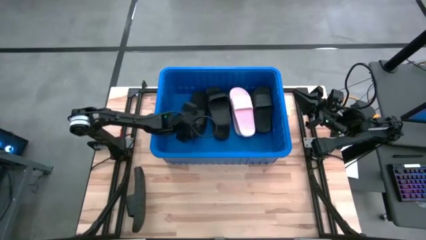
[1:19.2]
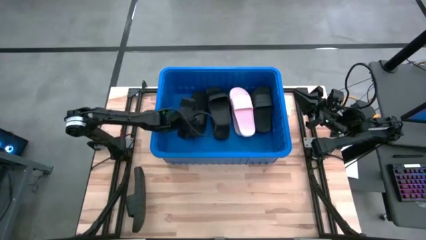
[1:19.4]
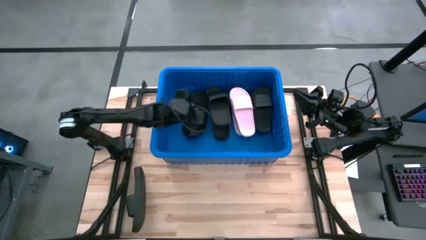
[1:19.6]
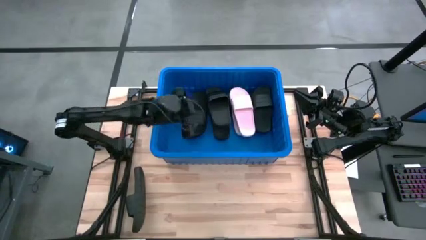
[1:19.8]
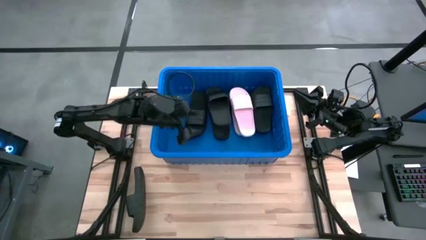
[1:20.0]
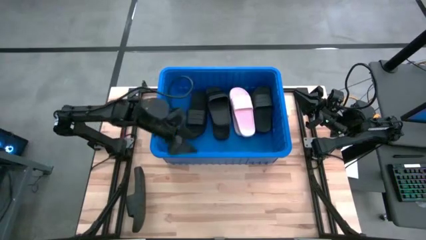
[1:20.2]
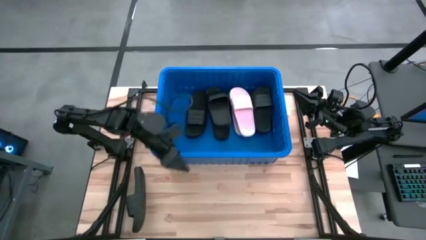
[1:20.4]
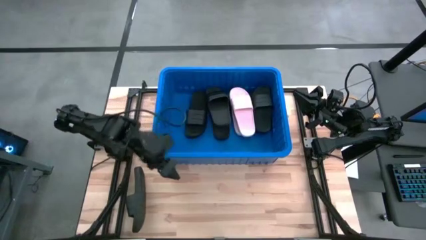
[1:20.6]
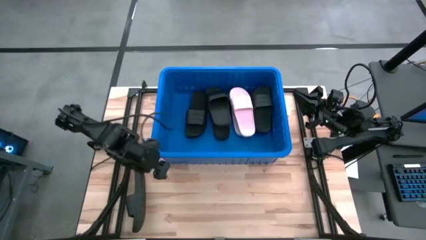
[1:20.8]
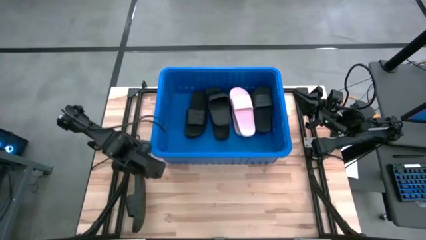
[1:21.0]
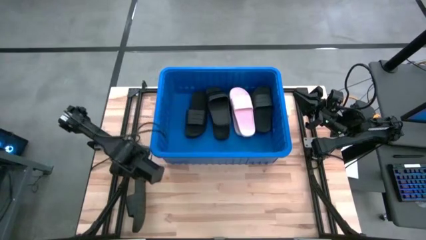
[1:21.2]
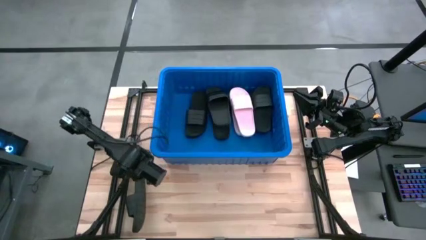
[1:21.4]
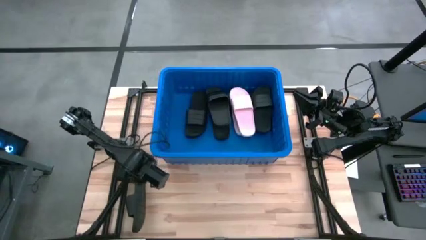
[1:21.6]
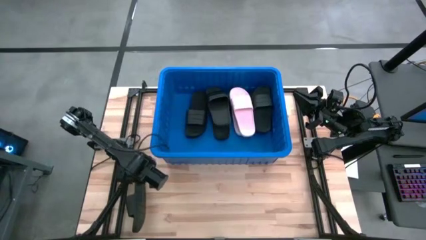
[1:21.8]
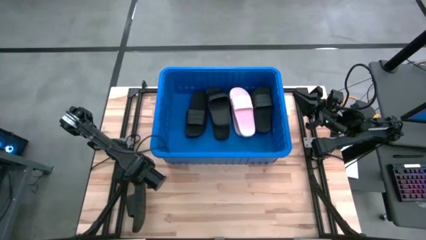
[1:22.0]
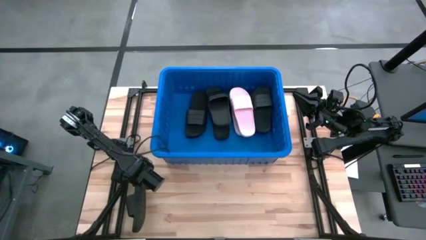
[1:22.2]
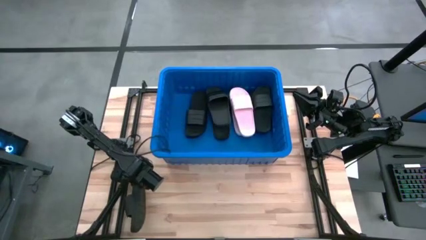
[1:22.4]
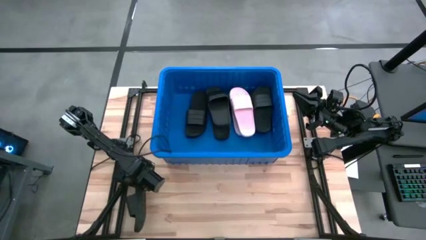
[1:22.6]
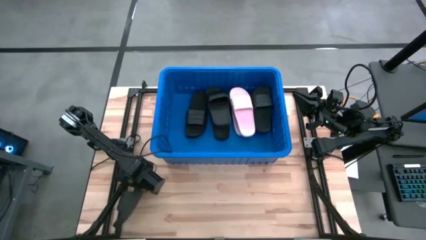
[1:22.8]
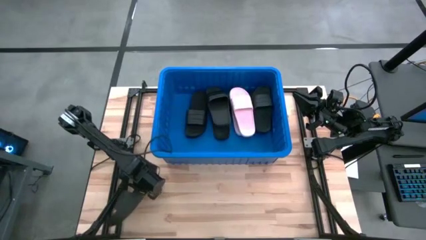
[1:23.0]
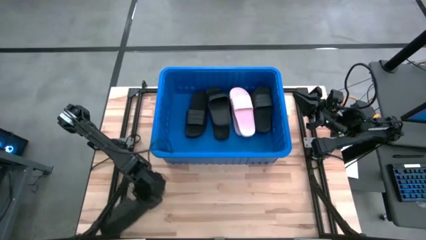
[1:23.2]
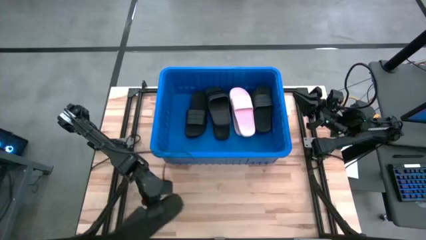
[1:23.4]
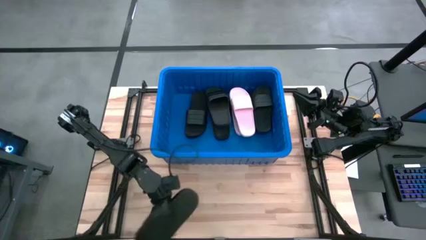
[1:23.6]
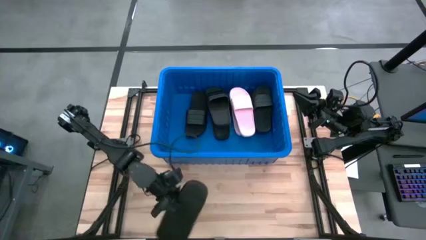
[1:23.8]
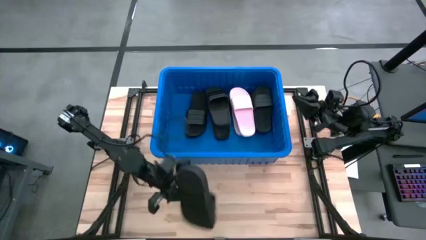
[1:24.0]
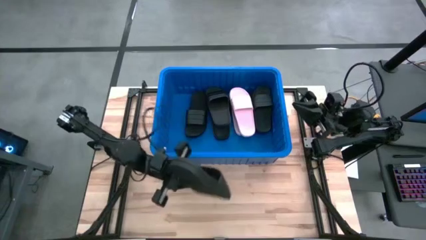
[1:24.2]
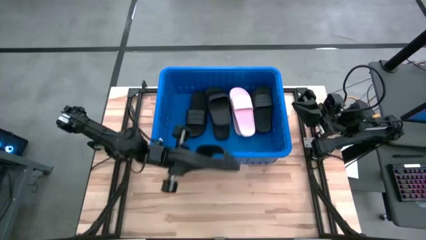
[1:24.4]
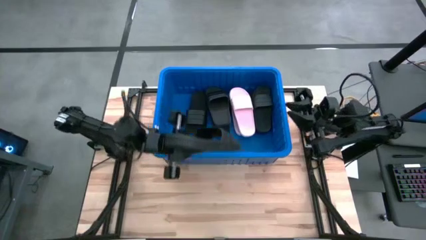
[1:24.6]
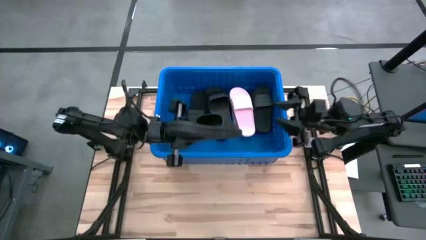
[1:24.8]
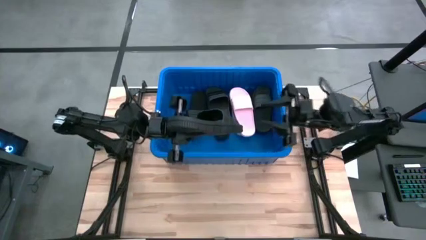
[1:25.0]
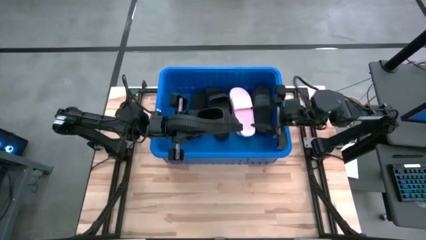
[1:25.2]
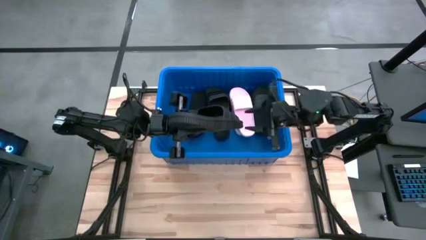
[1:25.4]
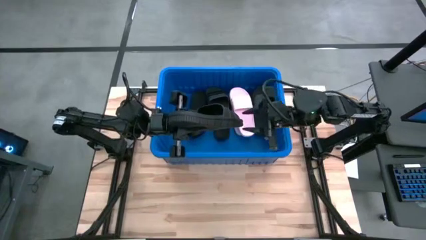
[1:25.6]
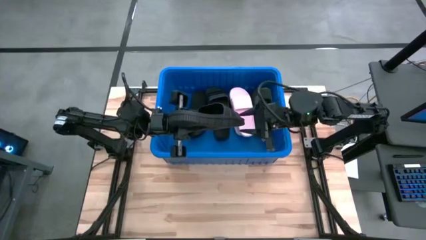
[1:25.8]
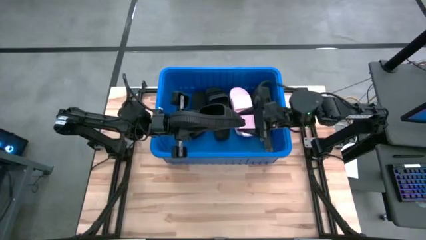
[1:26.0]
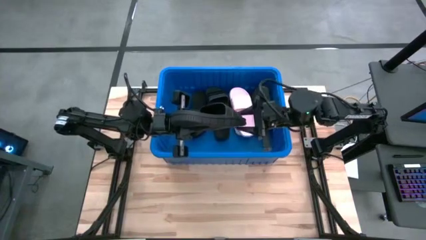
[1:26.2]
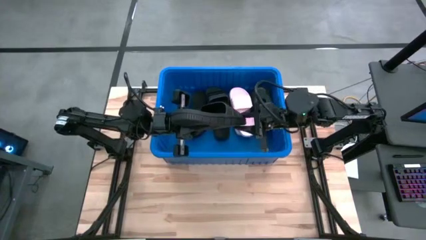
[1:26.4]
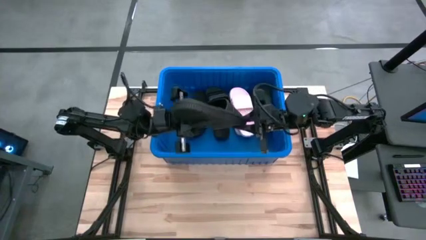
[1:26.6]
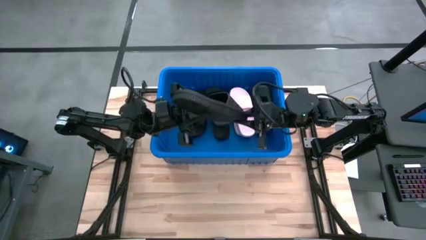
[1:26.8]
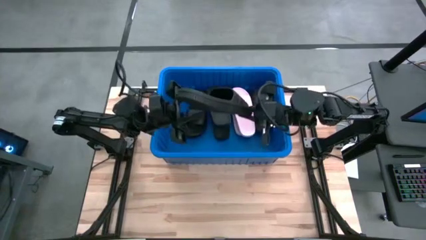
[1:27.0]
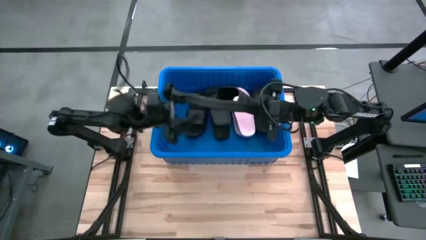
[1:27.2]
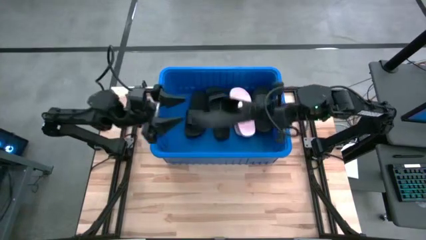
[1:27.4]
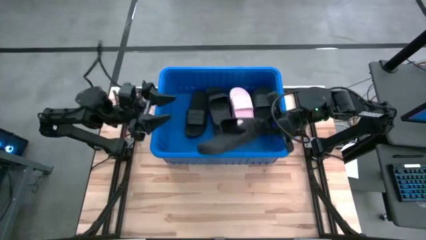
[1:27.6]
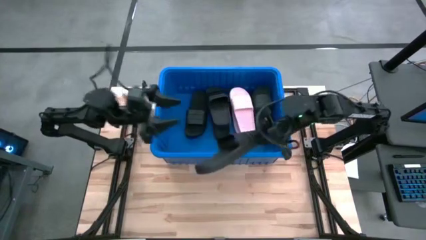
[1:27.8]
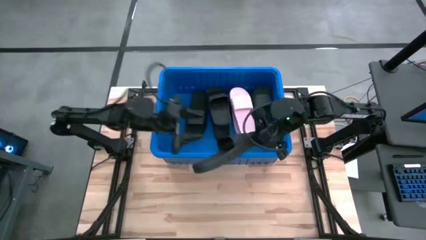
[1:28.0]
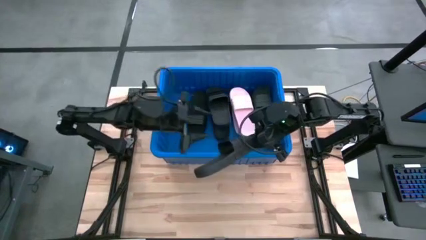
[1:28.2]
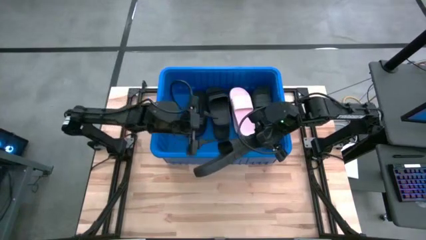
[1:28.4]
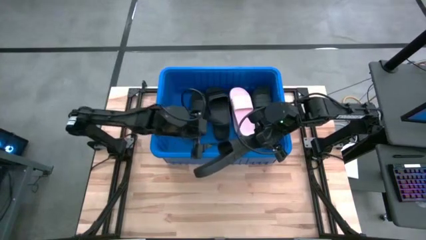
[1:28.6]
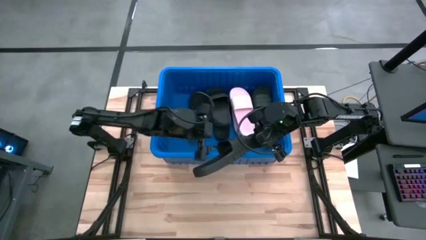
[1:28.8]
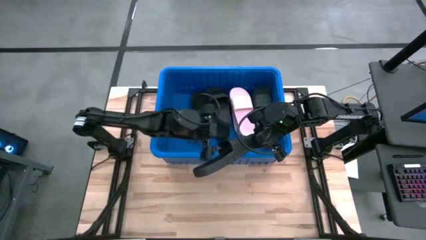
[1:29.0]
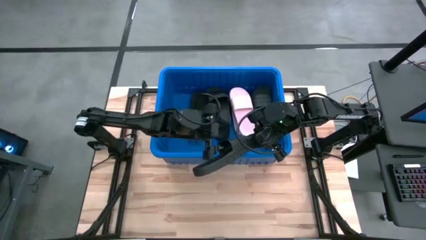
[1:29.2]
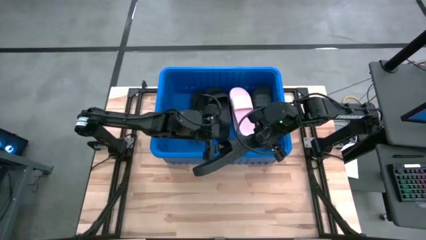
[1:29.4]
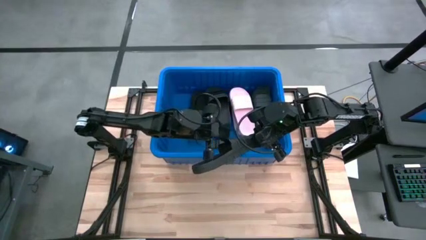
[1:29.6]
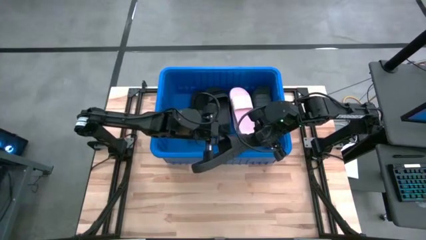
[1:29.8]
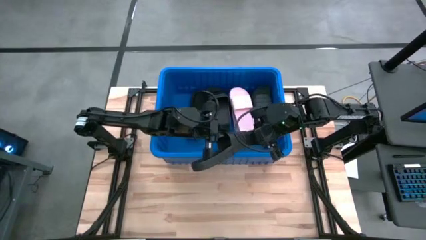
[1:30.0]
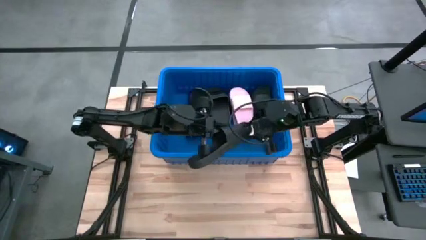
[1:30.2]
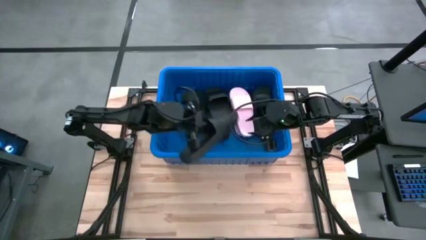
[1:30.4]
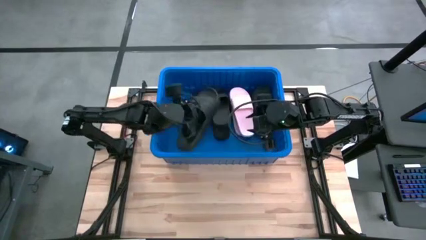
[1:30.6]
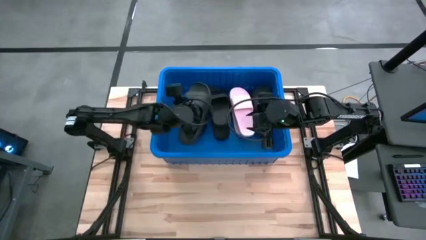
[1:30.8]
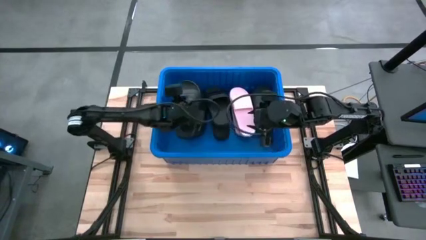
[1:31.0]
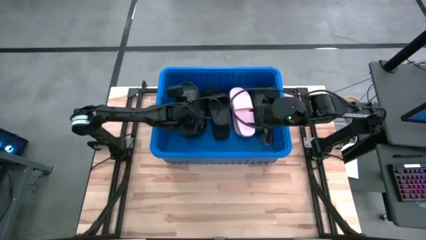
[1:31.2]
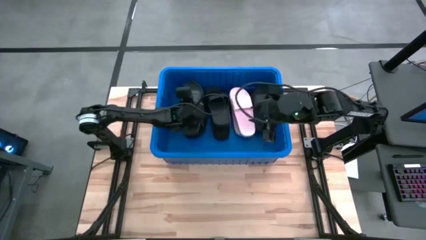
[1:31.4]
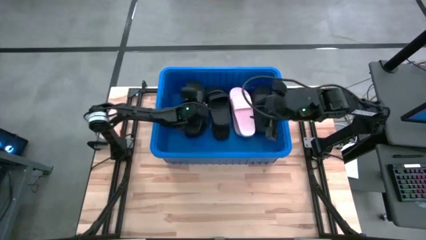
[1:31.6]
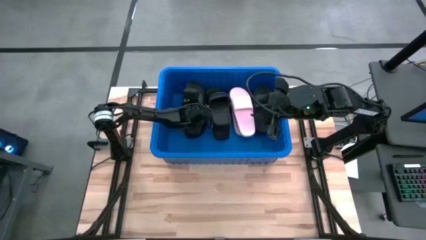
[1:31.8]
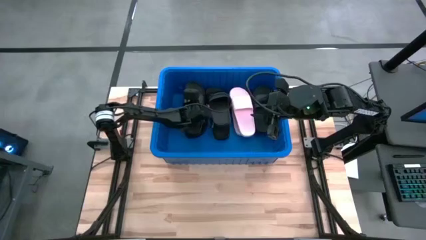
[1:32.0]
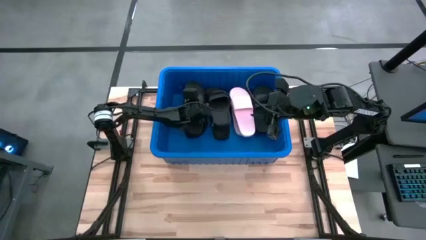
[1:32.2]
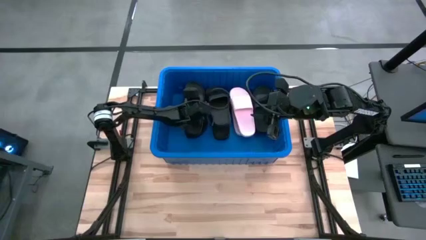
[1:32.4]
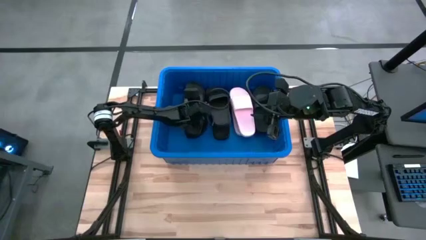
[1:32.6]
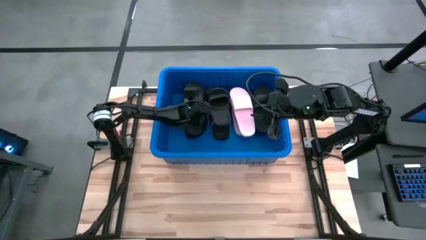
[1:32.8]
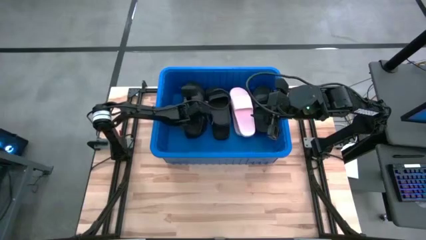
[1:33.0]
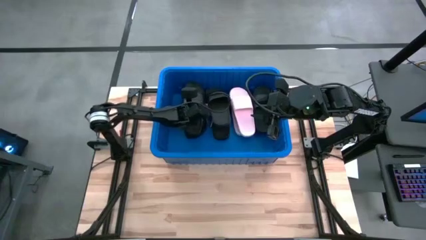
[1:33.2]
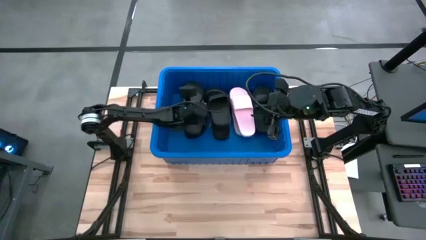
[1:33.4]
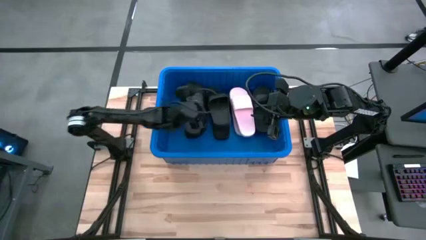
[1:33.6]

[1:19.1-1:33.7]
Task: Pick and place slides into bin
Put the black slide into the blue container
